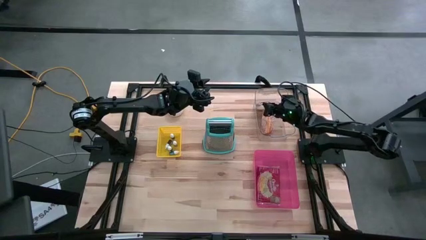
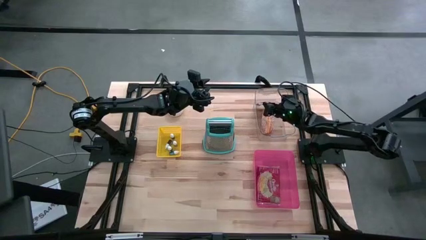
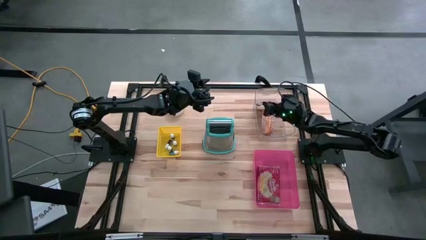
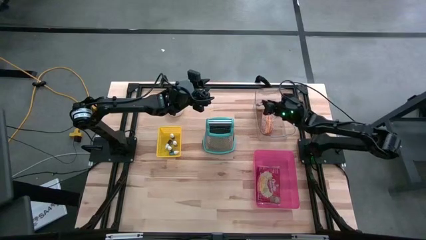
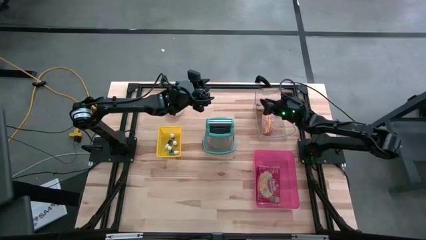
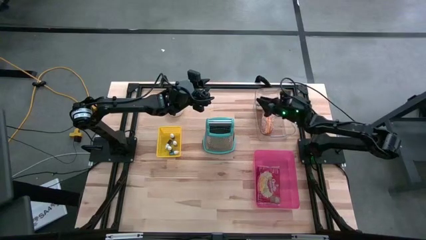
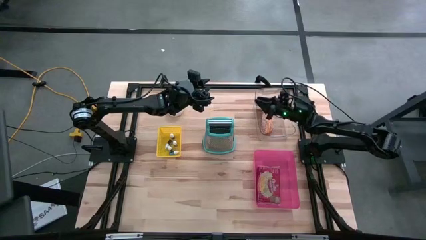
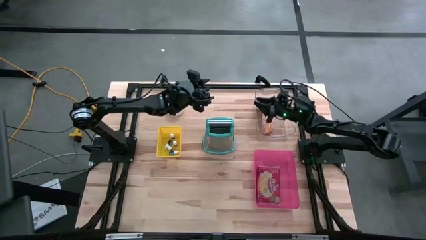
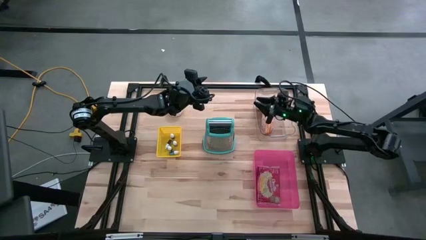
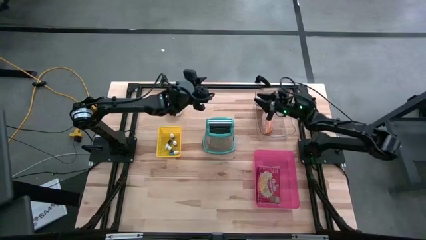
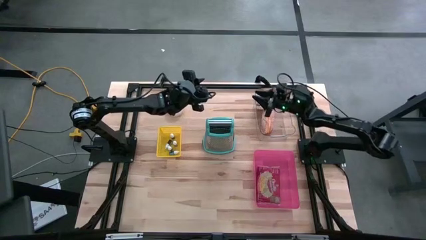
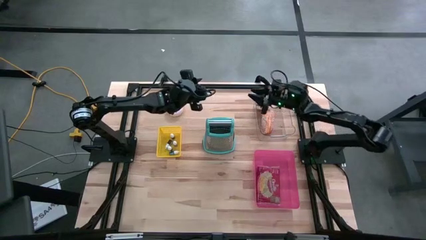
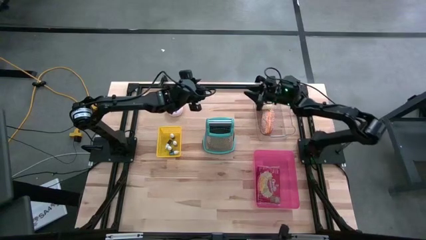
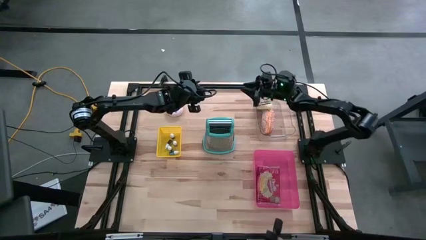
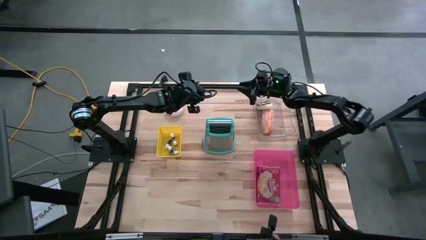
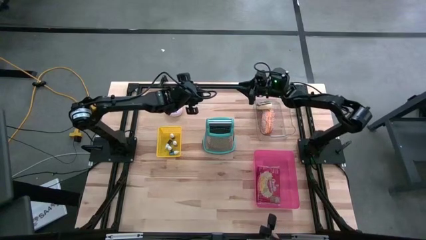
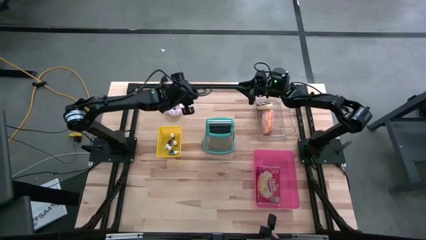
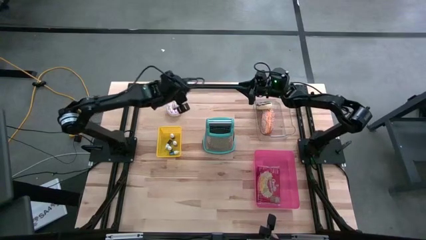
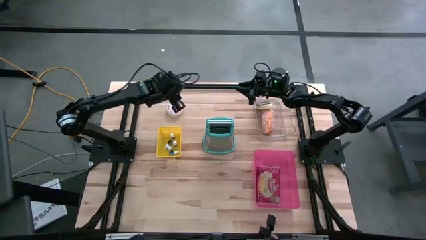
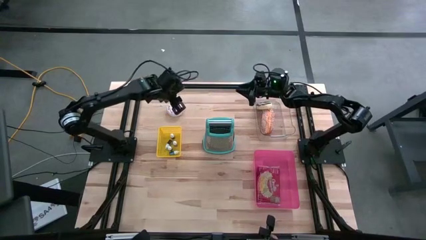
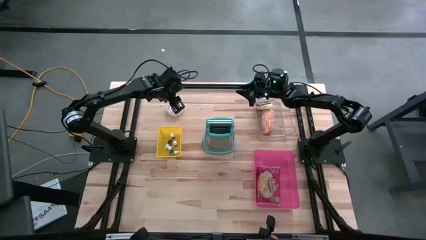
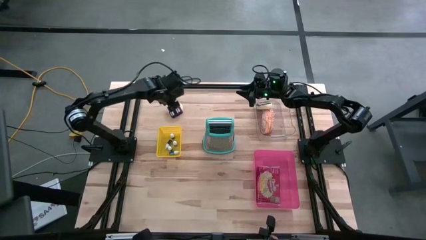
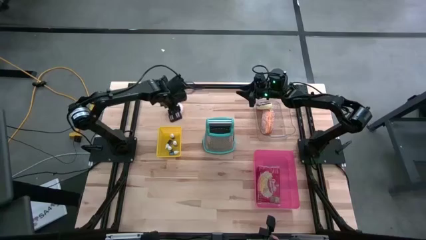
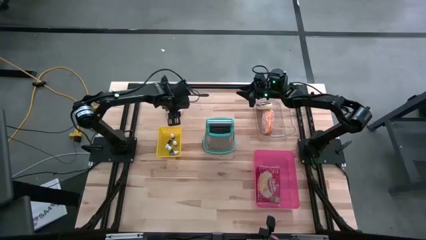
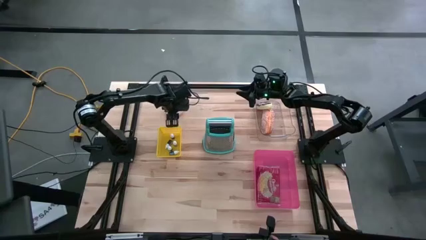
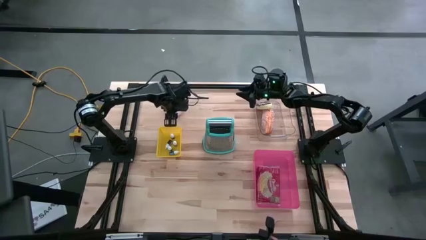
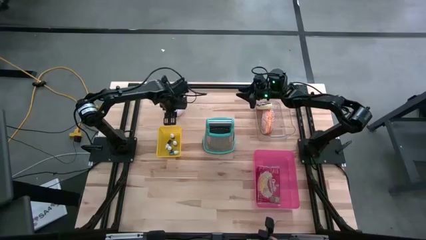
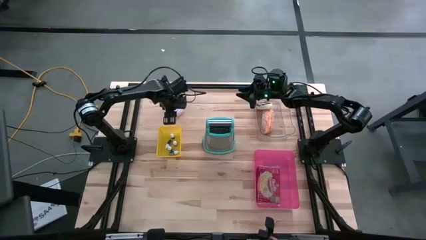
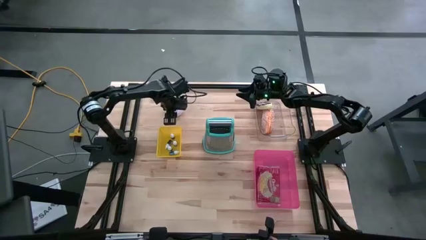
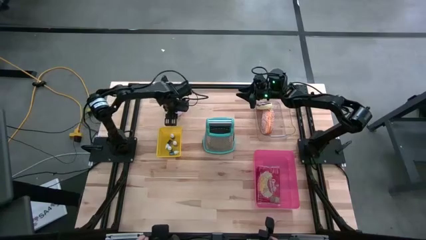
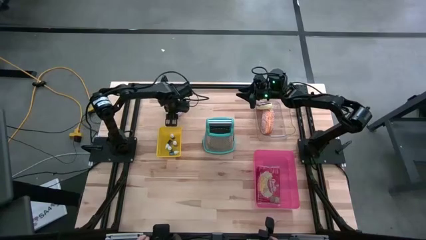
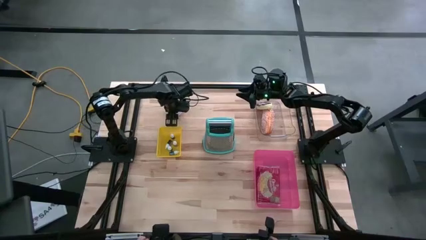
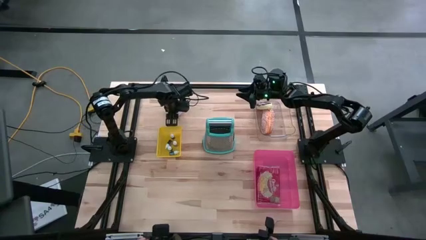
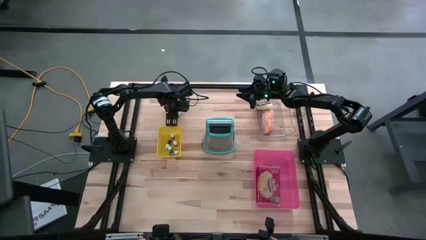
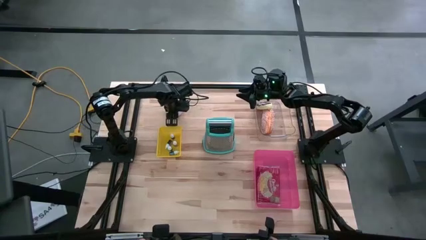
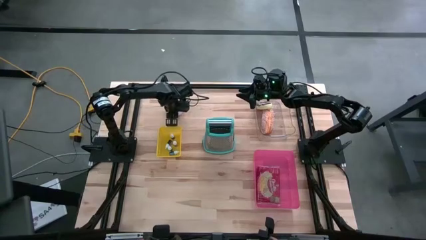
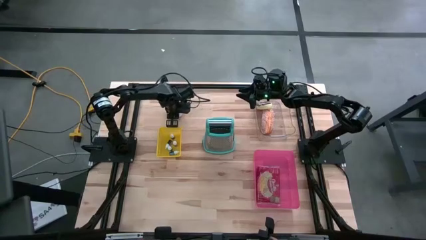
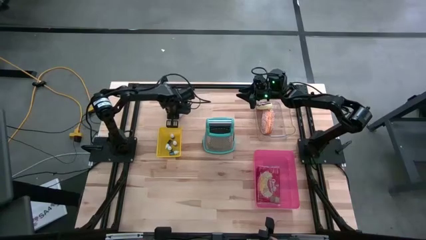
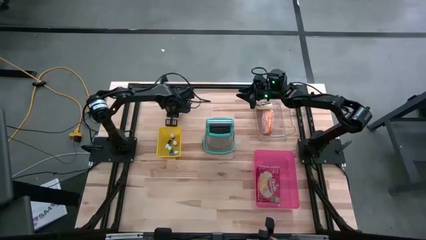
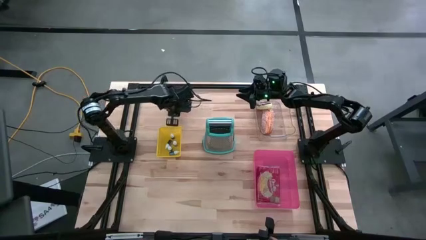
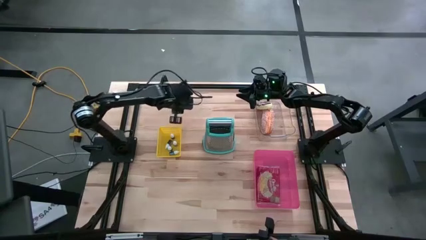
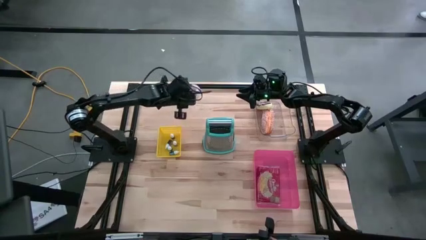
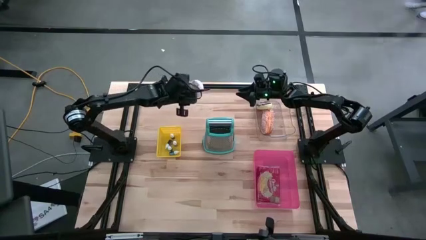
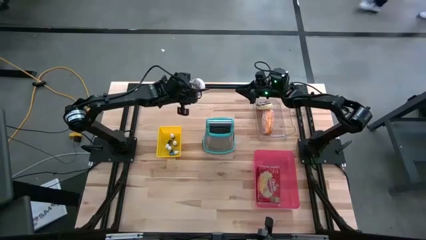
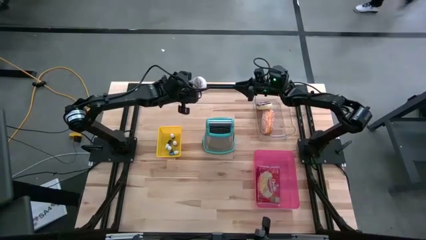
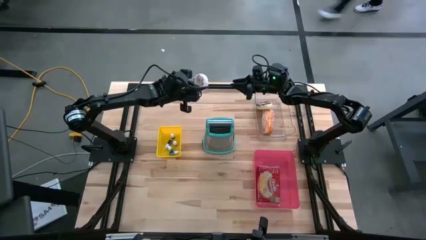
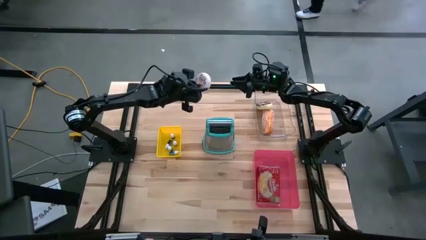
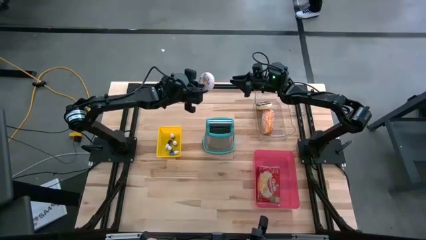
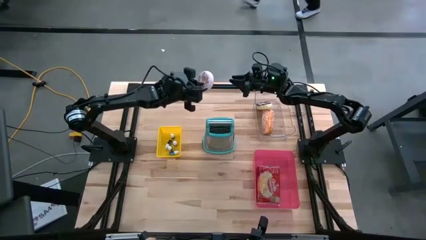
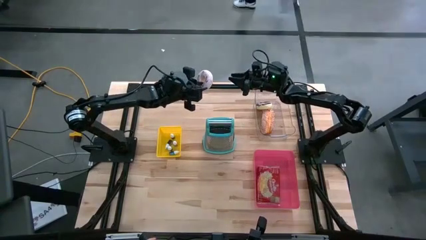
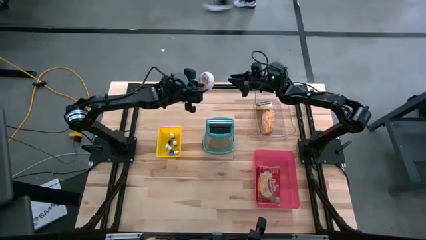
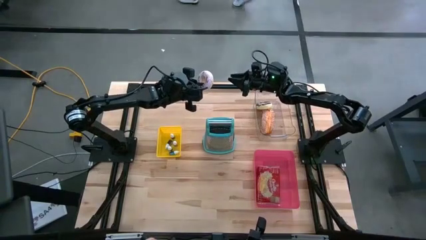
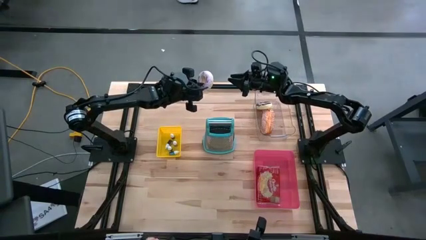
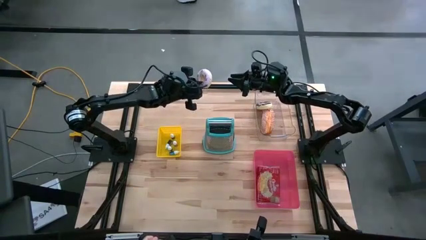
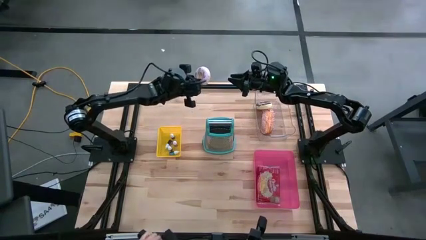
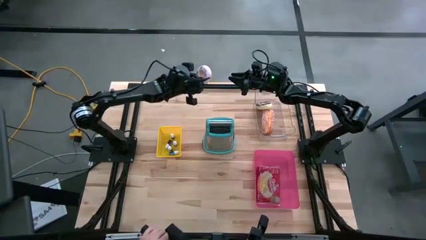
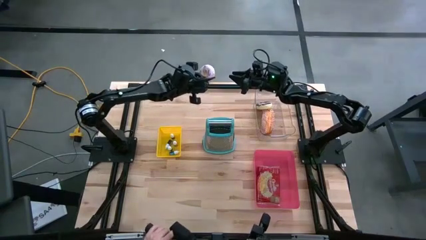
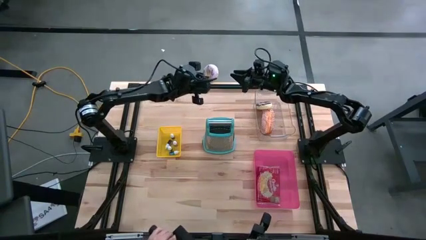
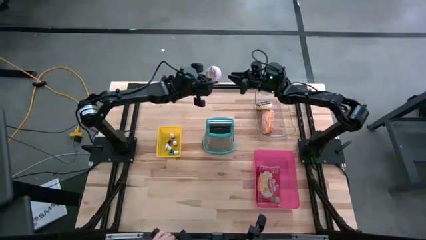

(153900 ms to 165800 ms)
Put the purple donut into the transparent bin
